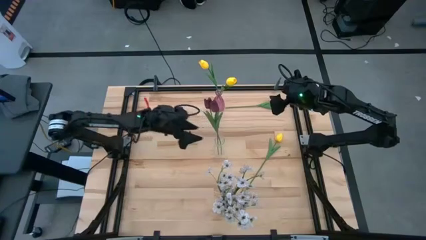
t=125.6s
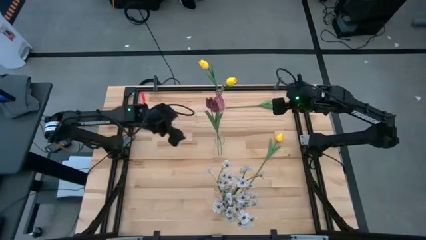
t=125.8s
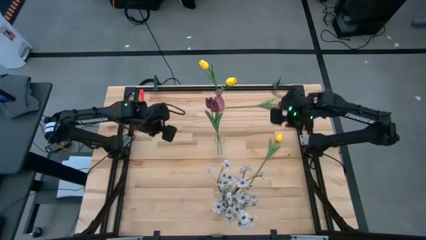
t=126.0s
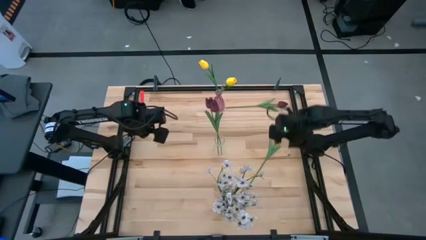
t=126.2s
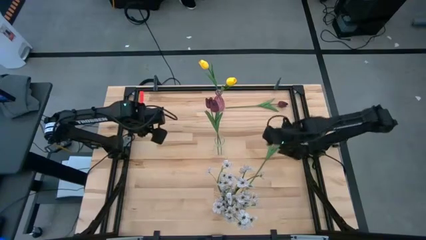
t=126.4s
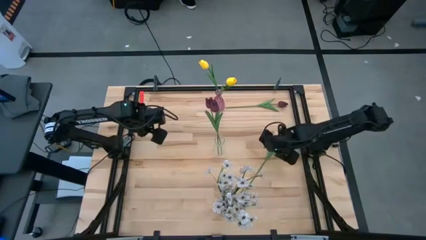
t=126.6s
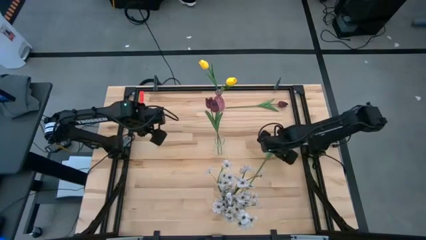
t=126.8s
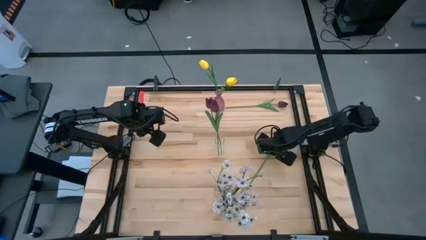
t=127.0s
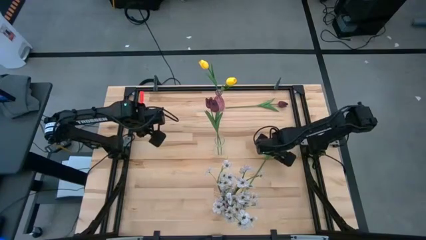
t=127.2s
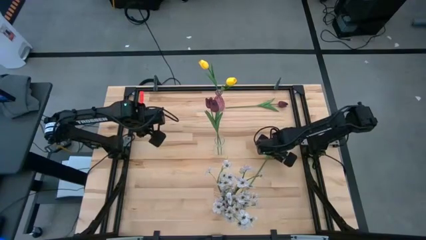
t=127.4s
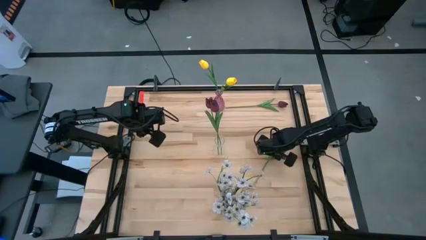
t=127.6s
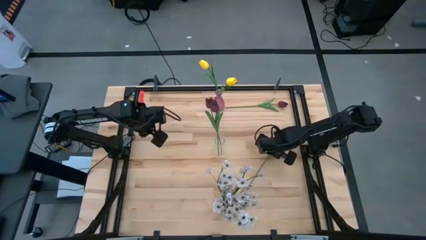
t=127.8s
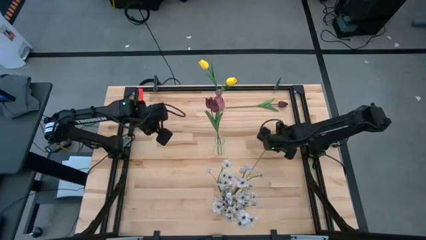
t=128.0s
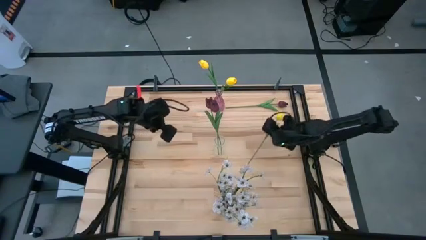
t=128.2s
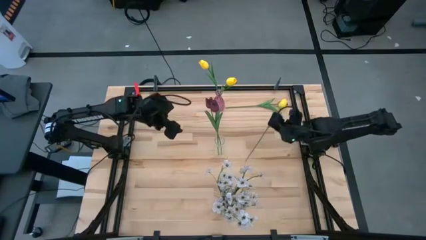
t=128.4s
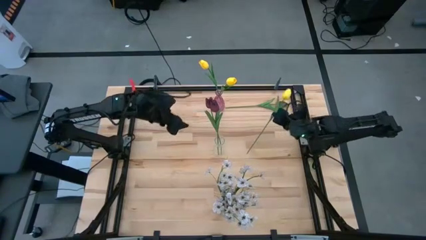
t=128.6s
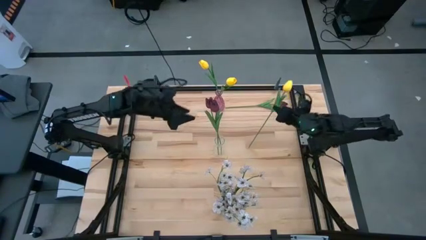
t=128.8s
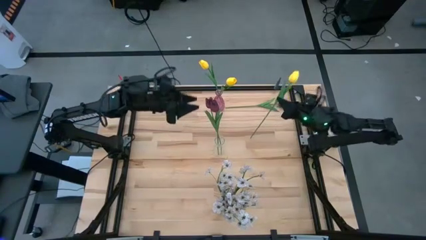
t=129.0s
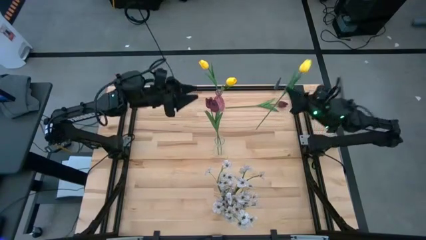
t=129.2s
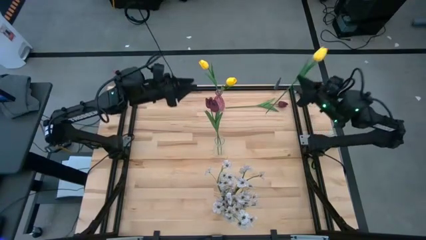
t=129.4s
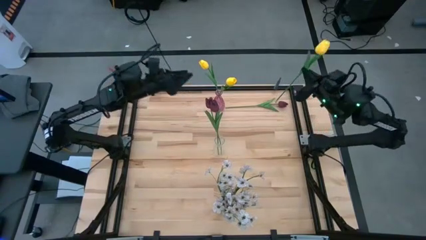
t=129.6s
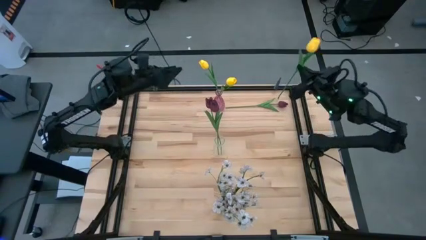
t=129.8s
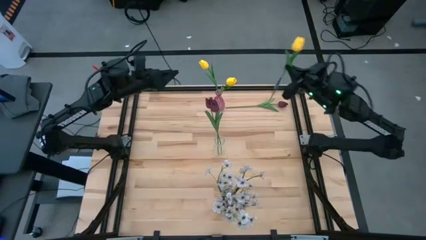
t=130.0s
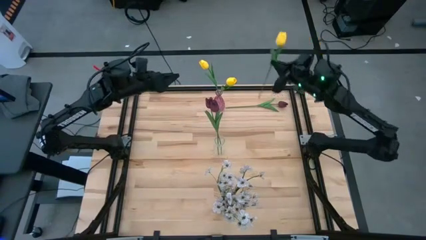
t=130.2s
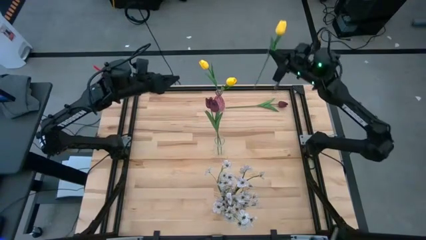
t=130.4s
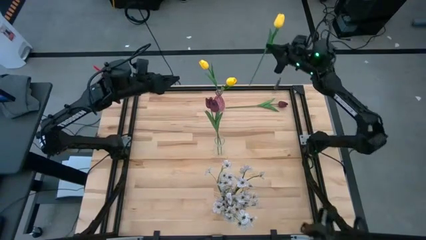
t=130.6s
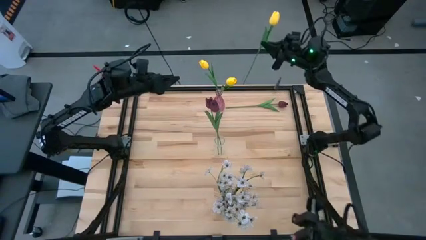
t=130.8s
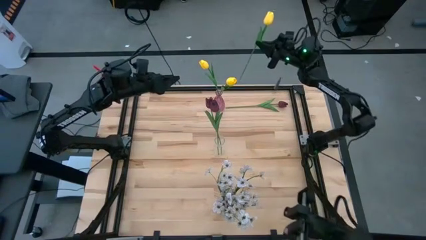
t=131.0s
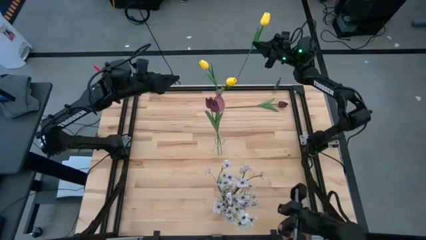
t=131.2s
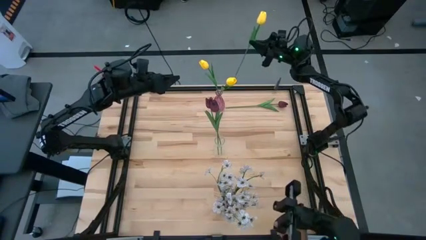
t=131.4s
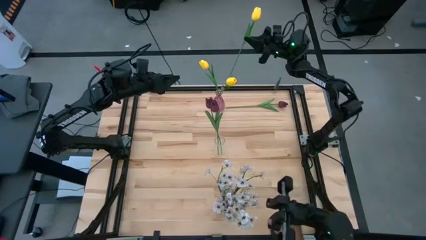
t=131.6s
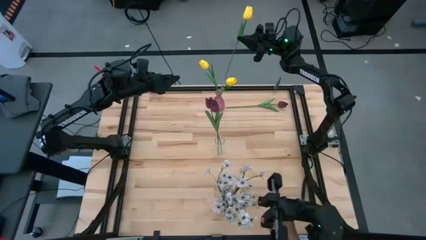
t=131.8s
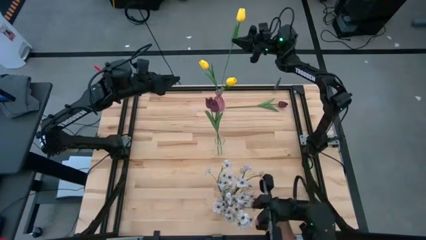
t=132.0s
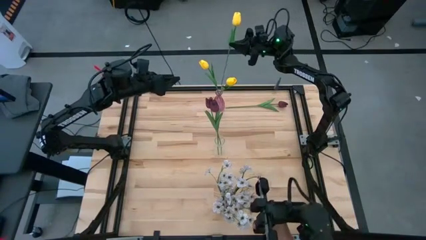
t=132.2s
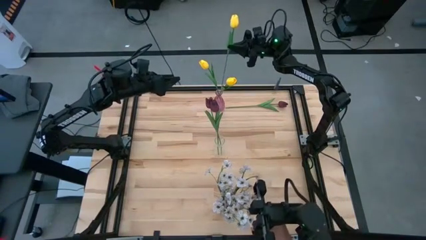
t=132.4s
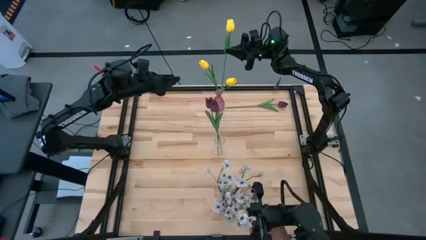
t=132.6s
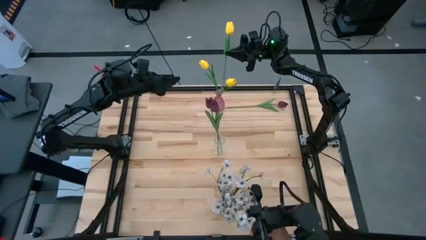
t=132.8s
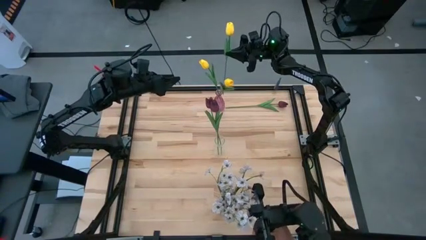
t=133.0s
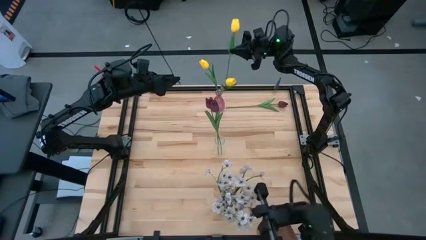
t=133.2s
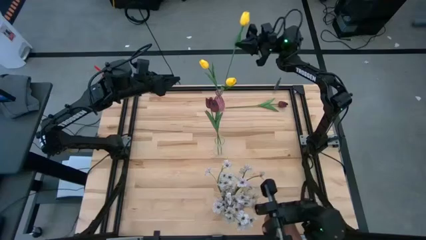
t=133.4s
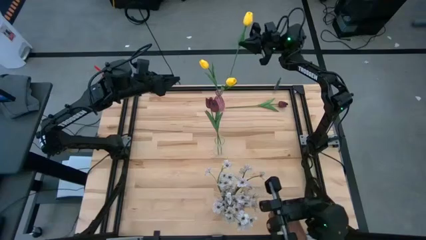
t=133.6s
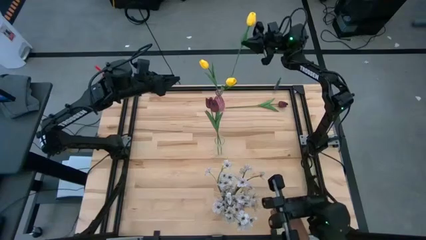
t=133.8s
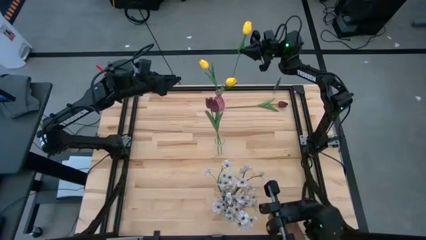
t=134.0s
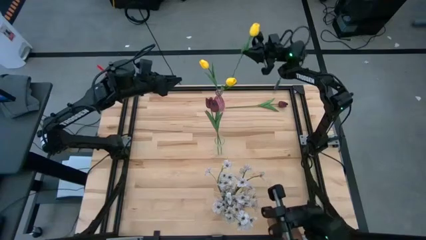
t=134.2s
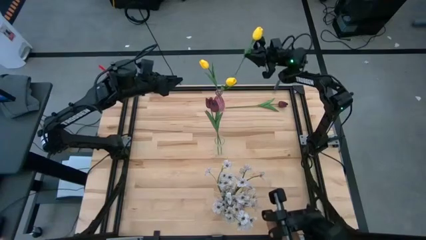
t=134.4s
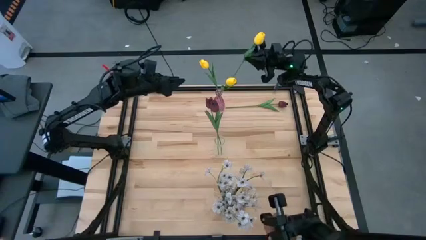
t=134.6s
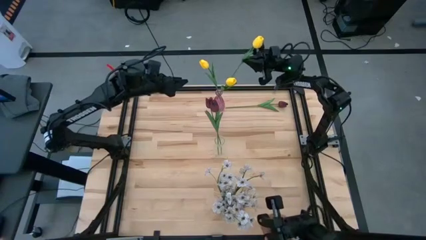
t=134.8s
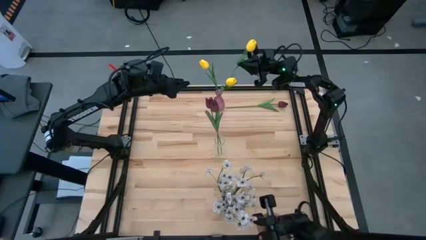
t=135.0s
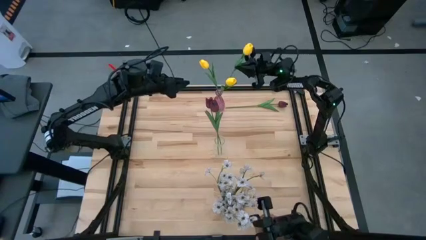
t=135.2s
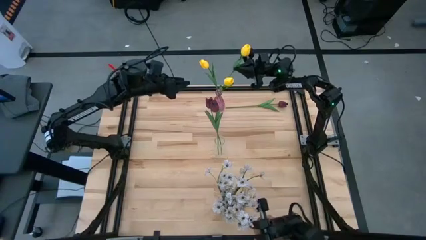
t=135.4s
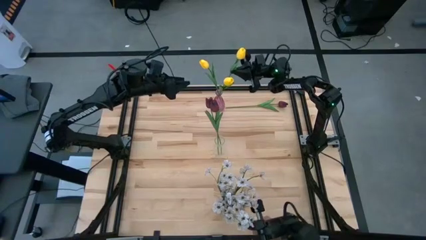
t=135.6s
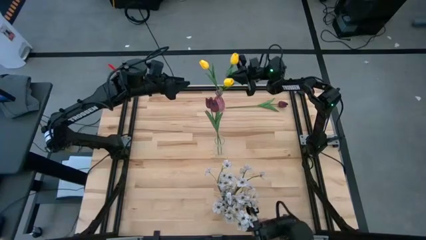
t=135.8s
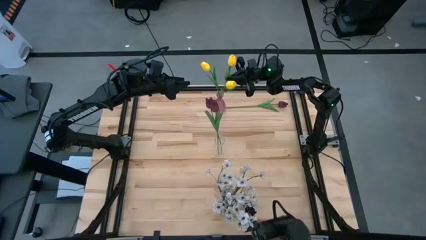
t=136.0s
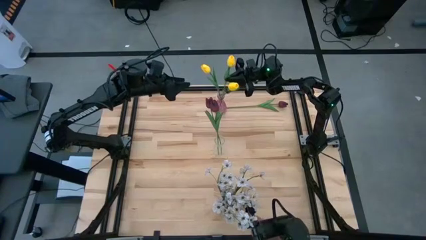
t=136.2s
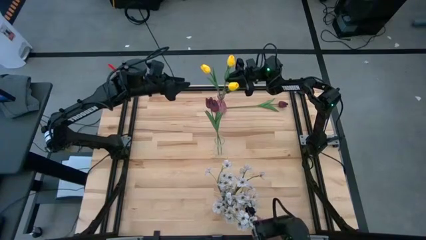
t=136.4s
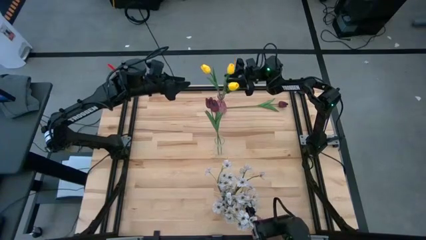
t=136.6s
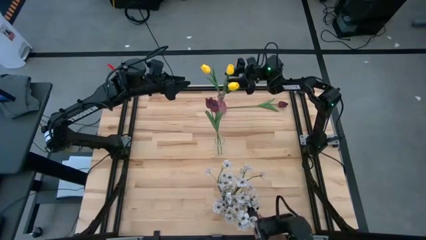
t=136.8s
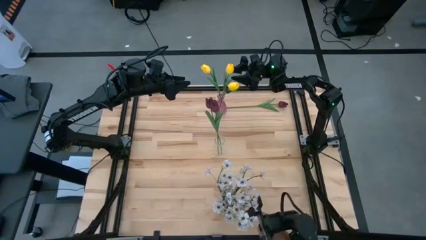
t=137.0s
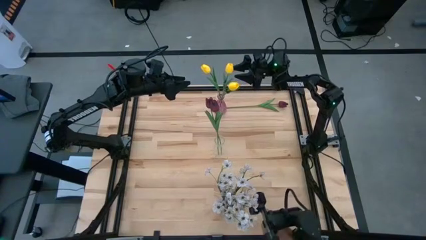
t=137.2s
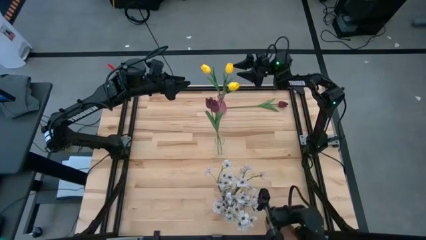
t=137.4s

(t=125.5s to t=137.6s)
Task: Sort flowers into vase by color
Put the yellow flower into the pink transparent vase

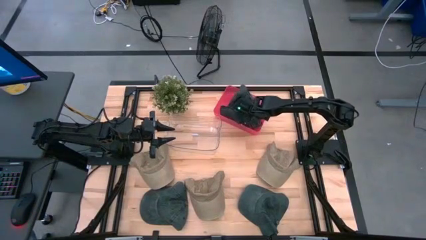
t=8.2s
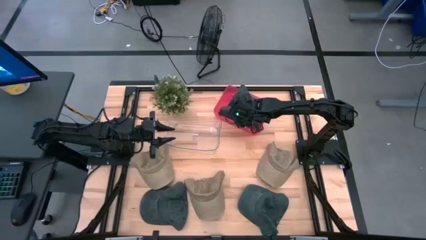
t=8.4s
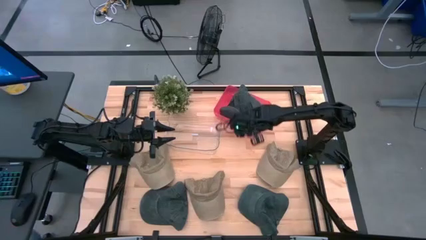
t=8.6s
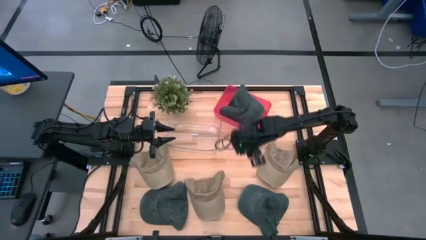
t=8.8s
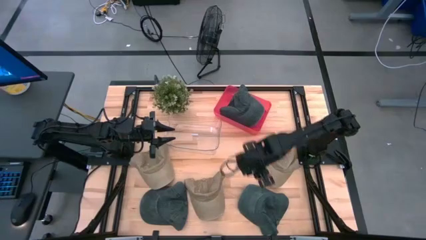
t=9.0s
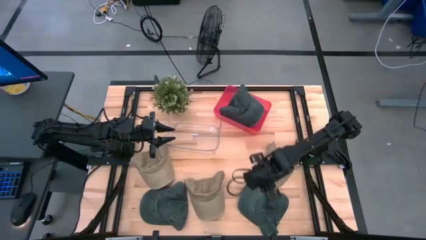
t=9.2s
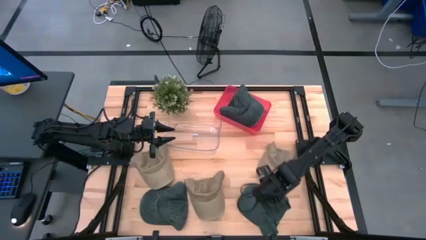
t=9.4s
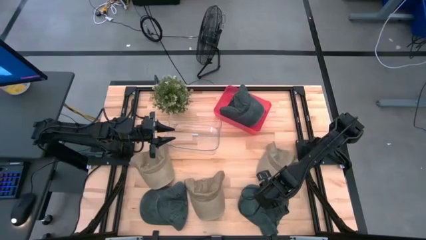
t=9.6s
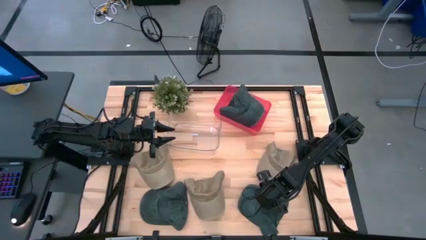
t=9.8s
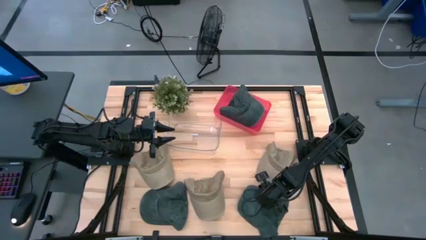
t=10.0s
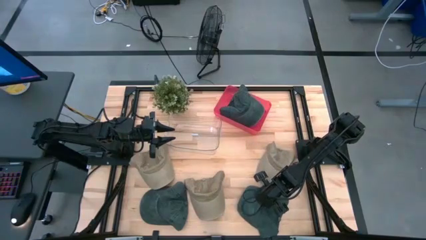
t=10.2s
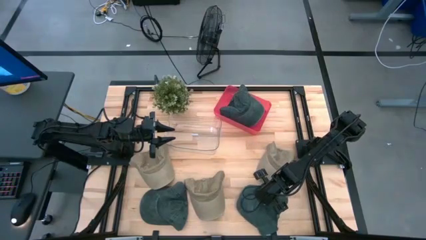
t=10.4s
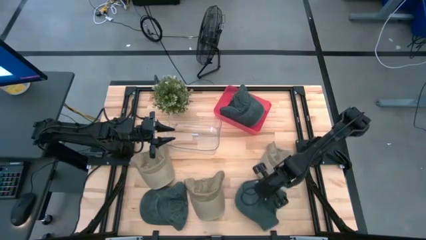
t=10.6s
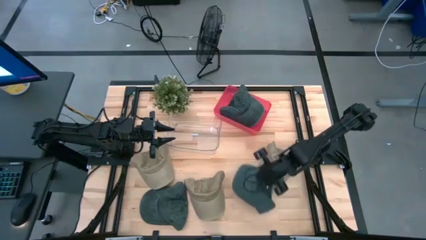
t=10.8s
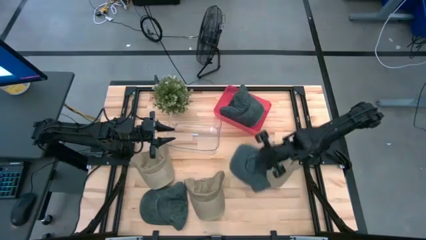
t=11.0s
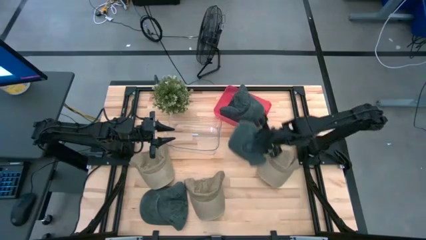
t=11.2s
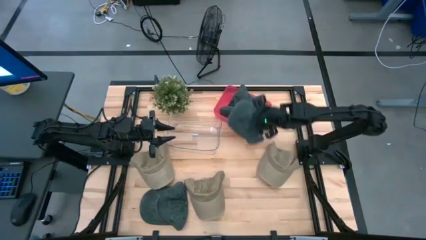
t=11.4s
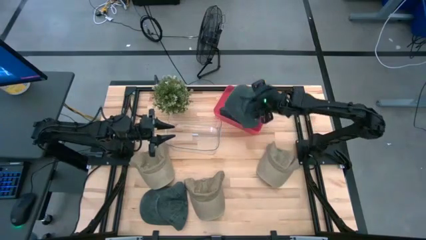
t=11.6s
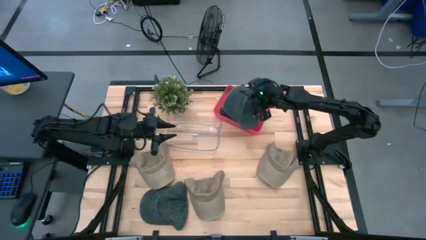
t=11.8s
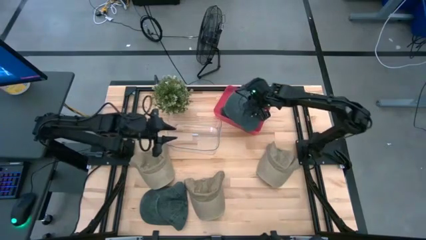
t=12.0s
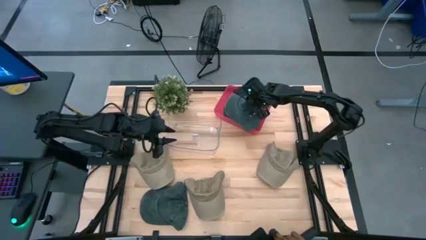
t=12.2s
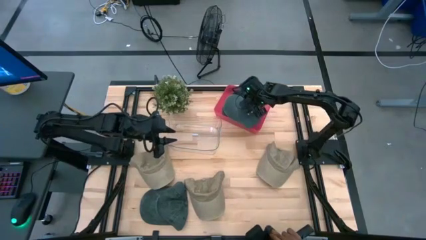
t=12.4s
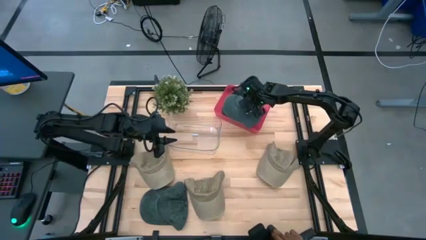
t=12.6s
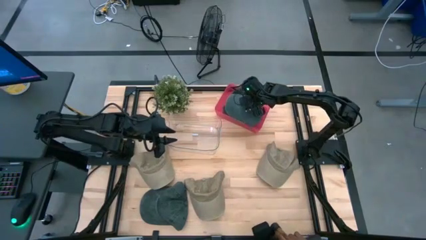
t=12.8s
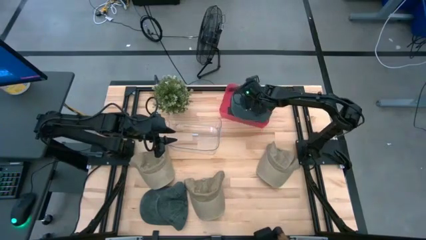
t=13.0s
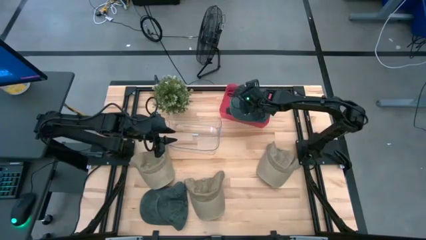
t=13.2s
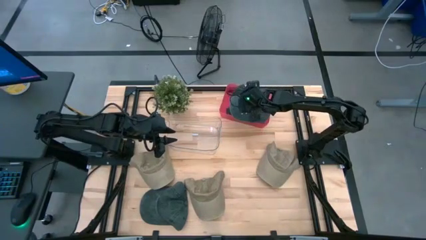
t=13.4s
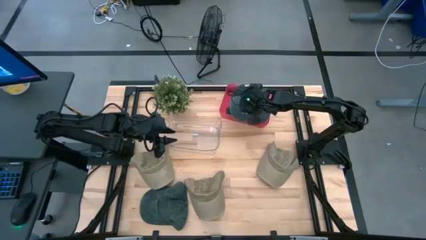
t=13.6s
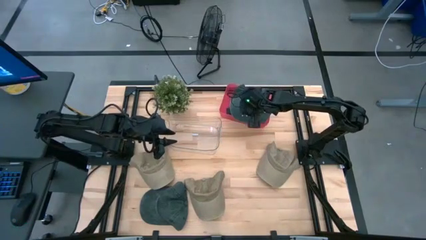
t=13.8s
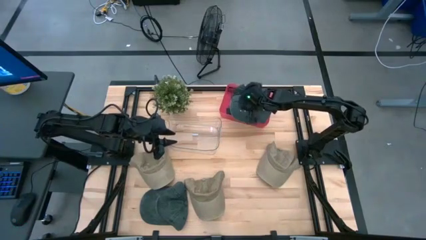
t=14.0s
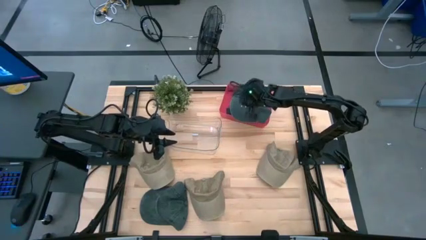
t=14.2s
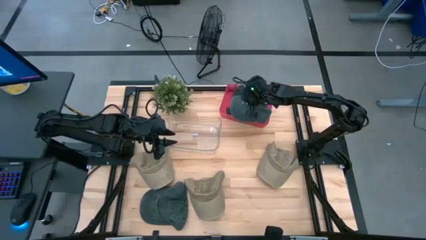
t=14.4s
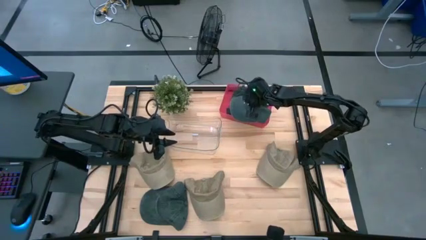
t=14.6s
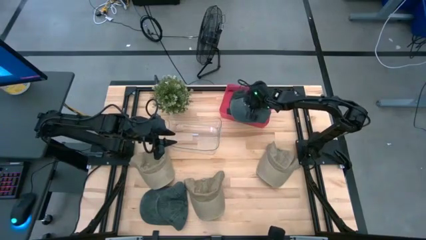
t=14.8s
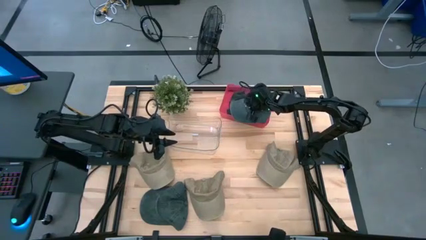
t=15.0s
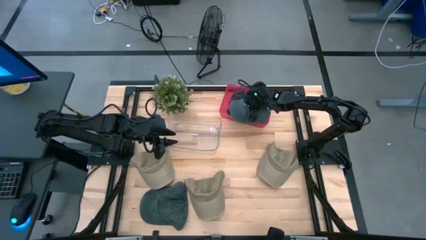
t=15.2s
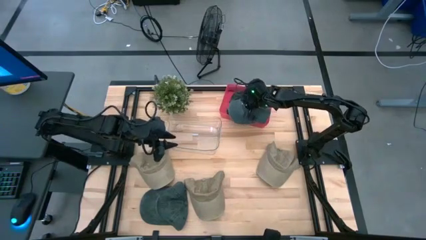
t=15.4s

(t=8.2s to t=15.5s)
Task: Pick & Place hat
Put the right black cap into the red bin
